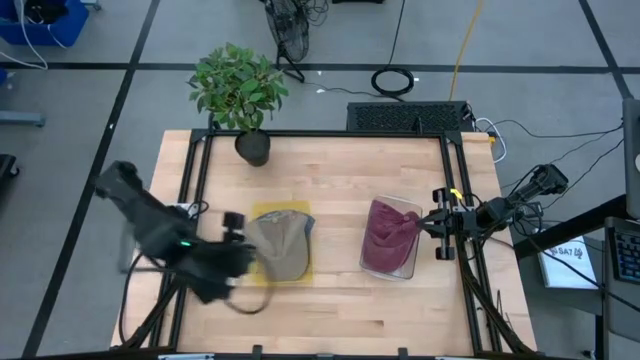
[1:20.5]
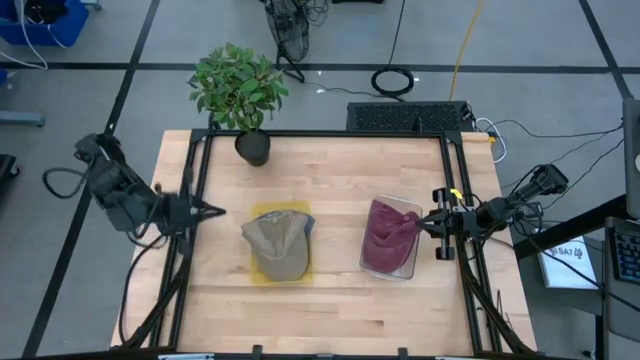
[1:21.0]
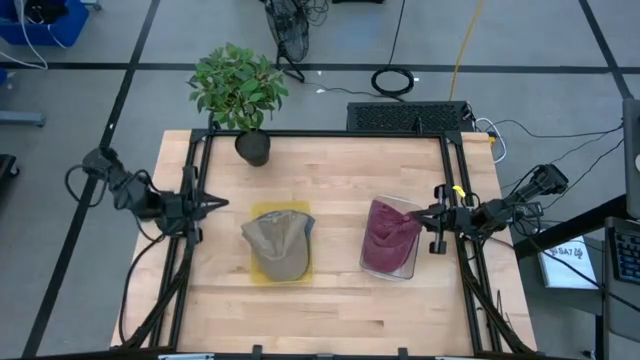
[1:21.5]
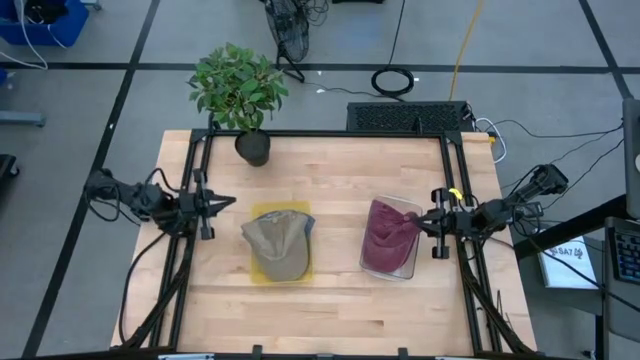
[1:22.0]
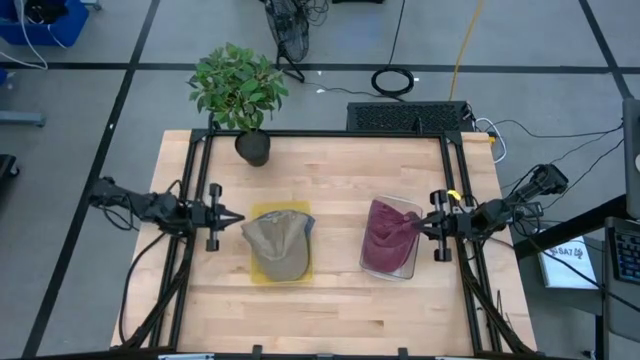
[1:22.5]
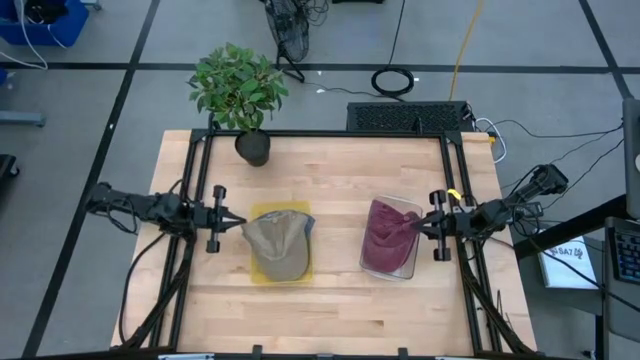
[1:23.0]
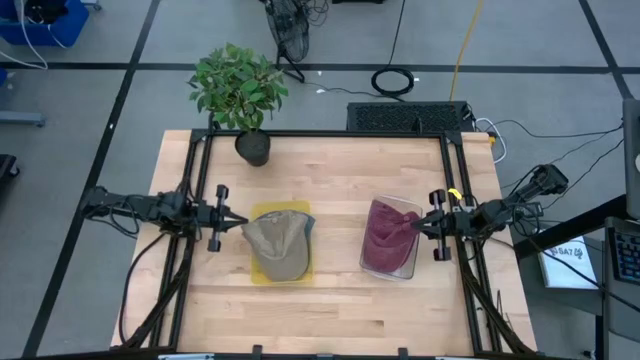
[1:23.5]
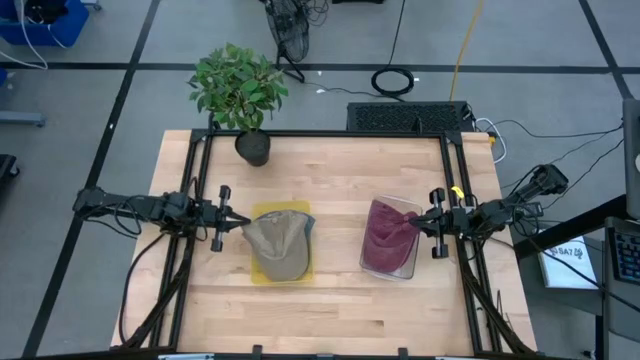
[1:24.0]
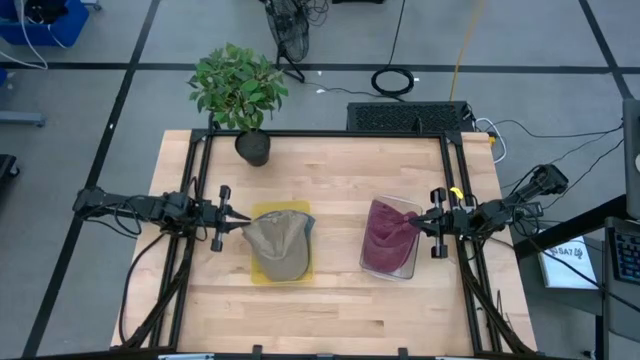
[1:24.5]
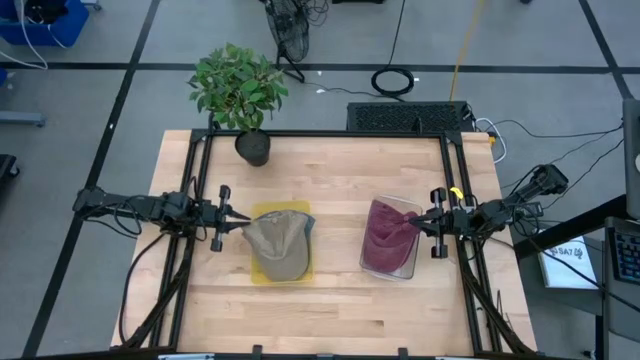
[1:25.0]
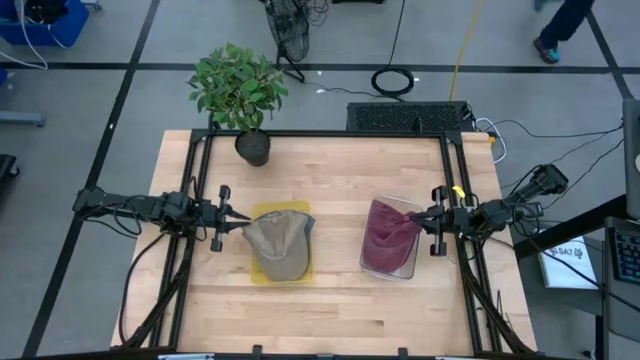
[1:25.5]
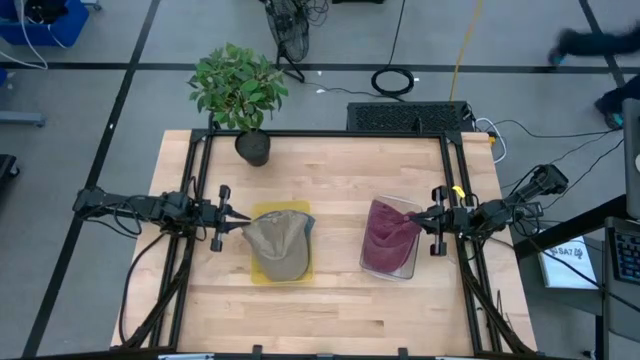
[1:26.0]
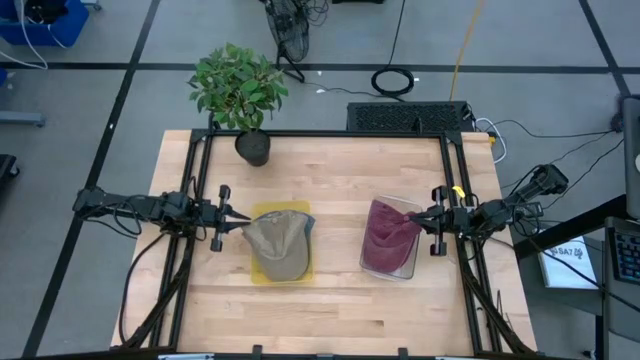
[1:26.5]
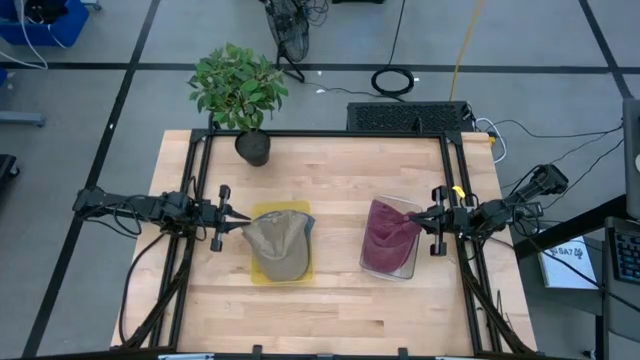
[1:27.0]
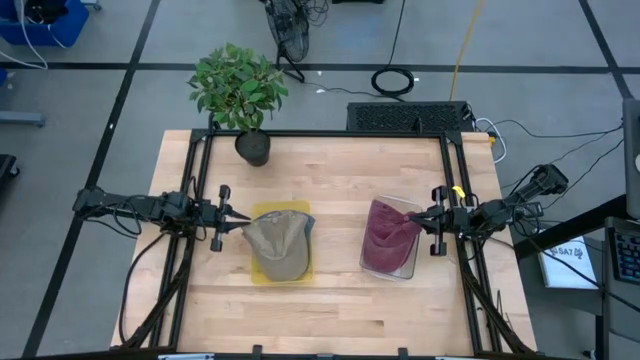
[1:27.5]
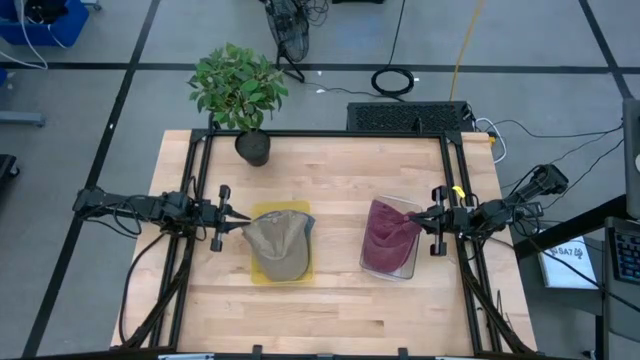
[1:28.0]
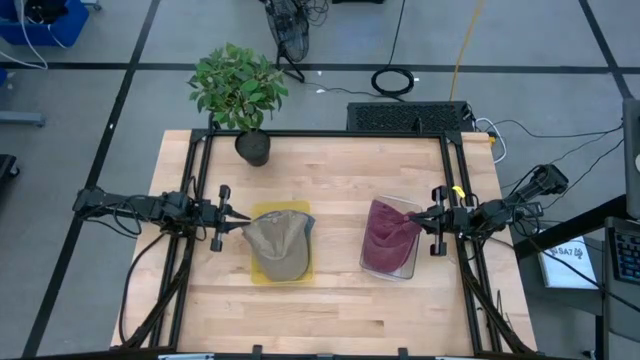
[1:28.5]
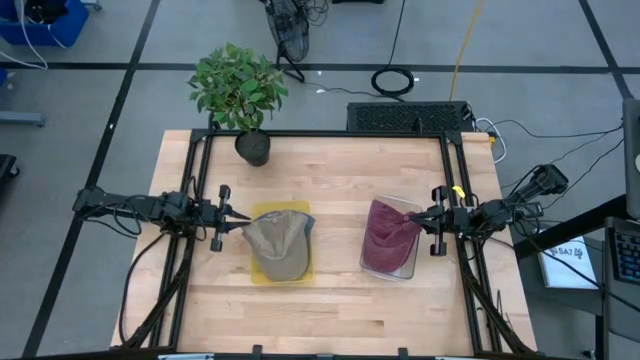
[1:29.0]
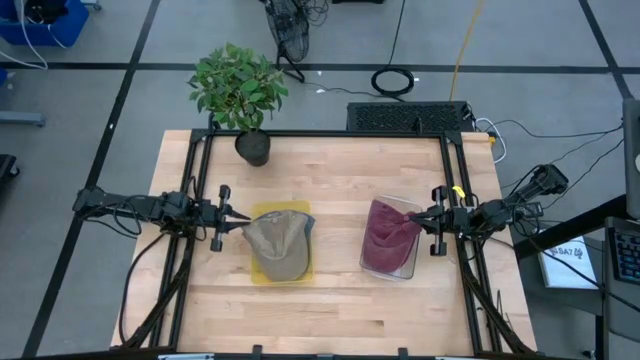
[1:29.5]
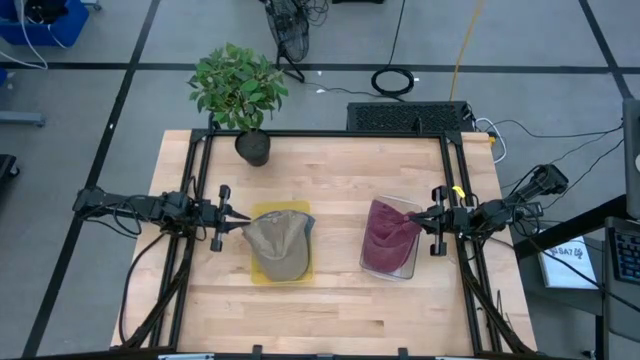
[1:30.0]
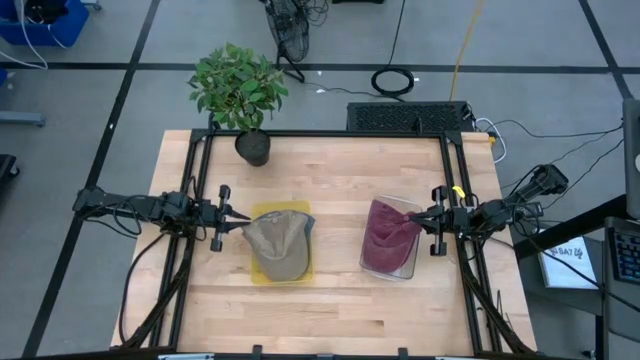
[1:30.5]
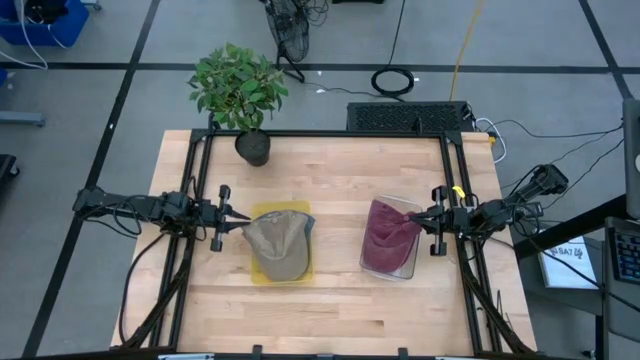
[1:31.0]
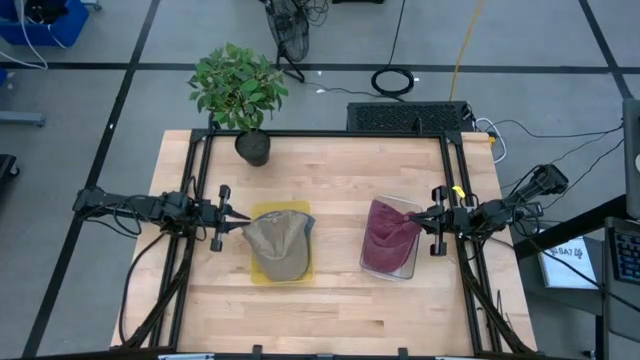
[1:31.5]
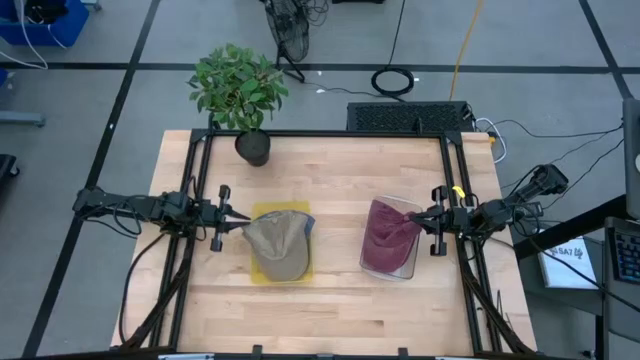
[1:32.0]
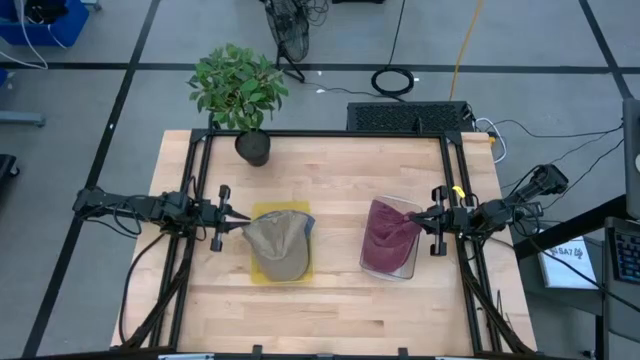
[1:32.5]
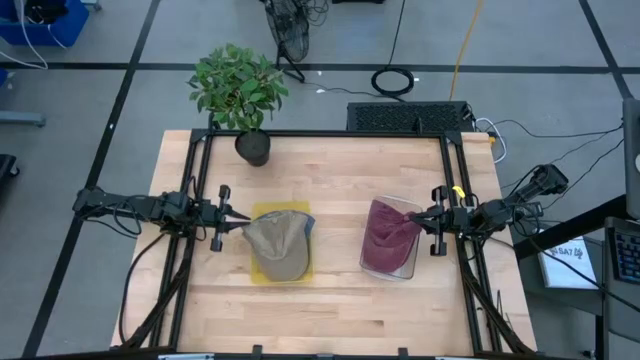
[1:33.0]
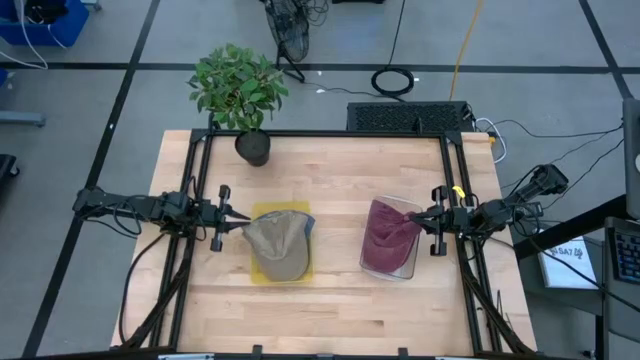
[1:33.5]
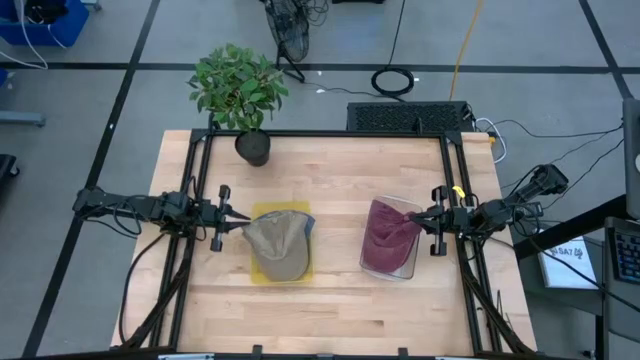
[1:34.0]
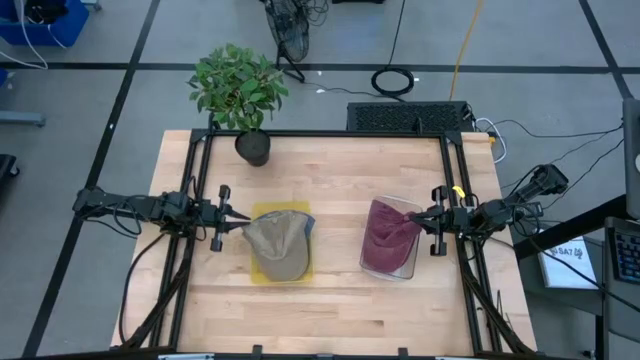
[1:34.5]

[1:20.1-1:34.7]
Task: Pick and place caps into container
Return to Home Position

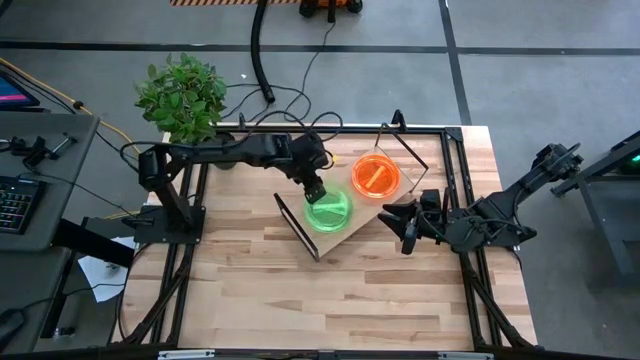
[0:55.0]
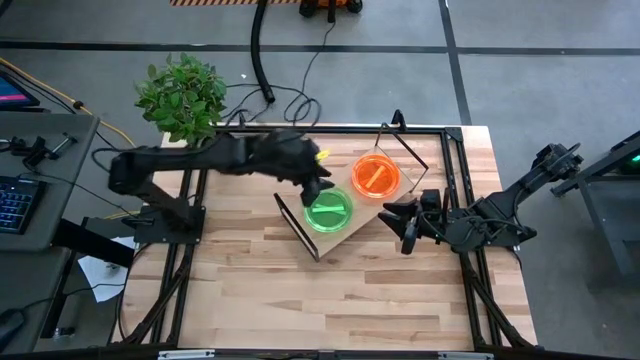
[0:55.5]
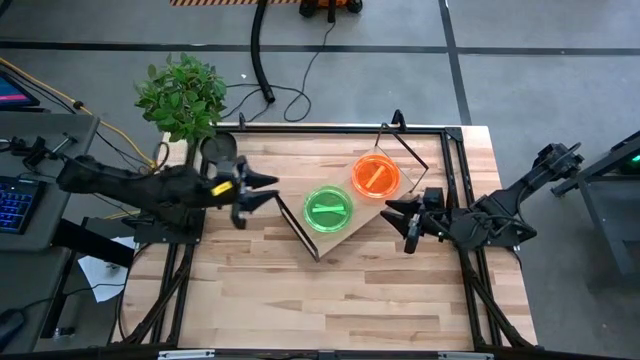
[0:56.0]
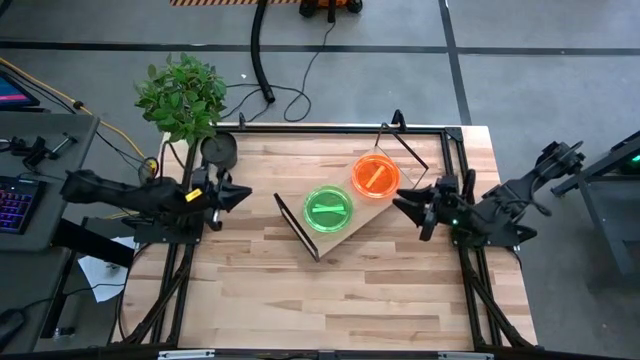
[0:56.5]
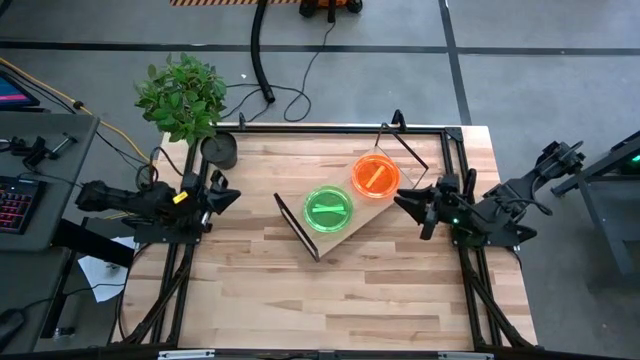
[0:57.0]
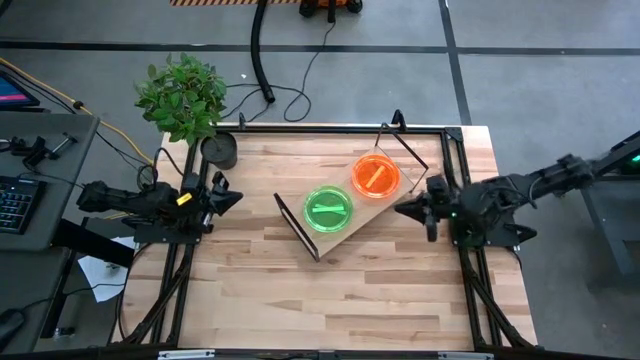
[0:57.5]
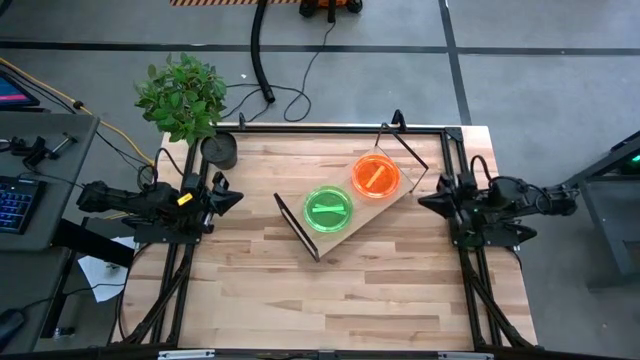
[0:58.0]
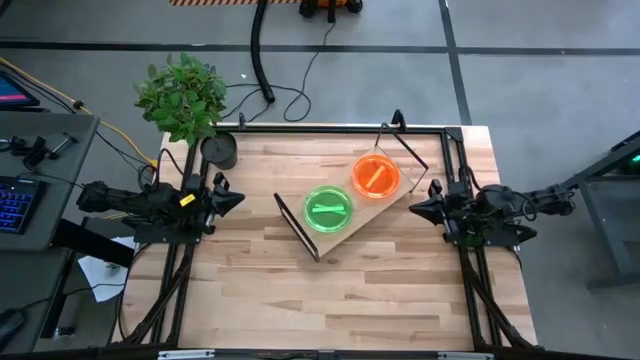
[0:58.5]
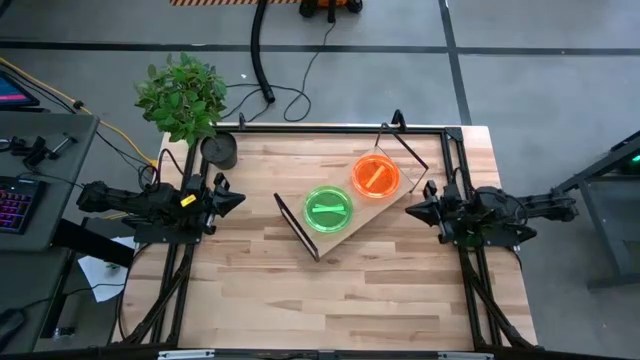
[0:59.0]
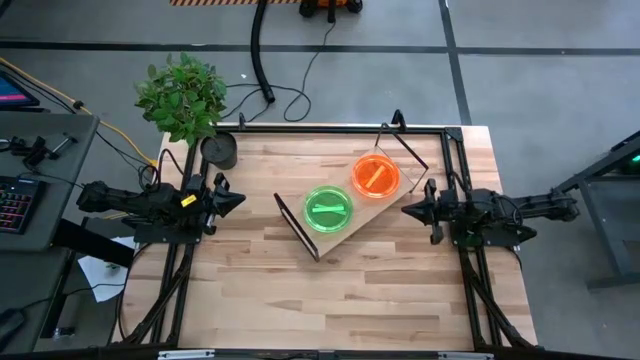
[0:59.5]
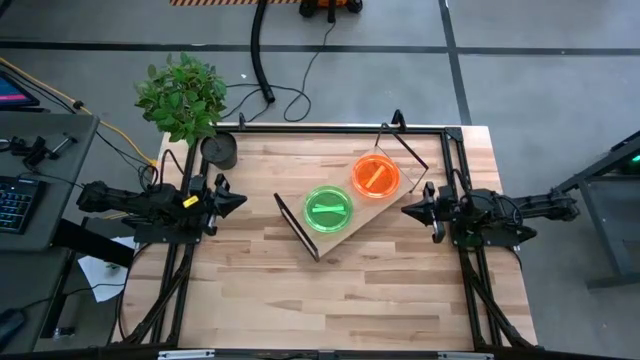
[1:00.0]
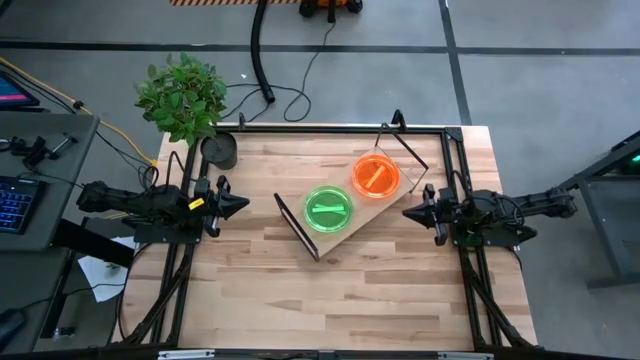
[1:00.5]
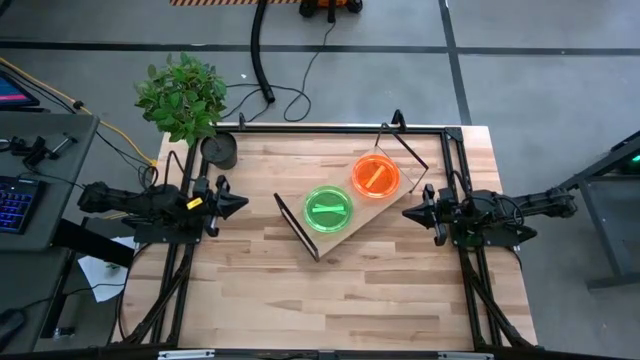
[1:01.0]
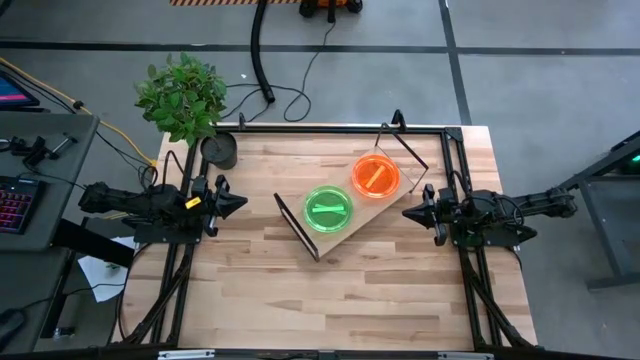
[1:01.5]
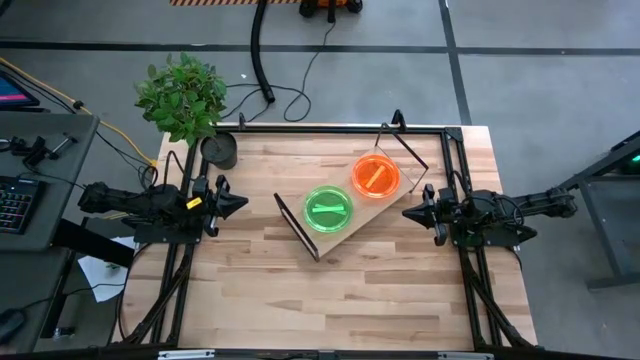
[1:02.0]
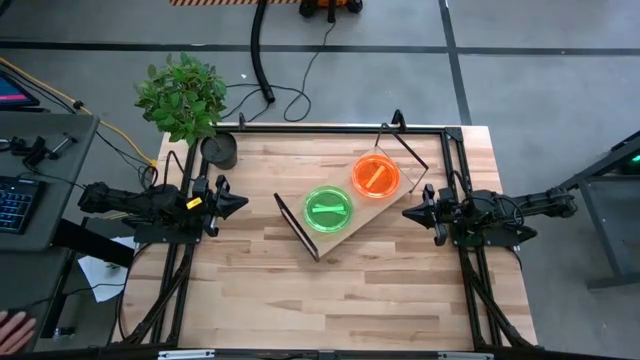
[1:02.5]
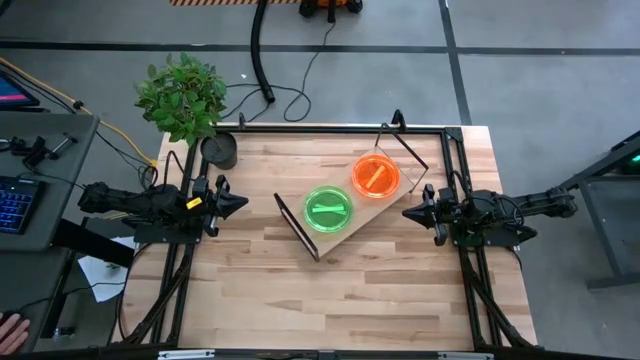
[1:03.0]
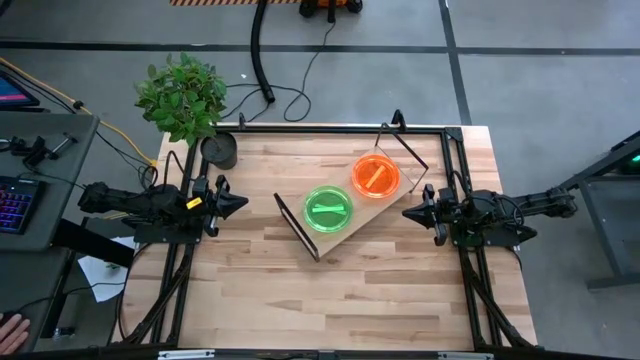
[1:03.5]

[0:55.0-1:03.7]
Task: Place and stack plates onto a shelf
Return to Home Position
